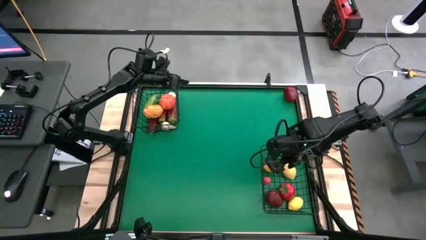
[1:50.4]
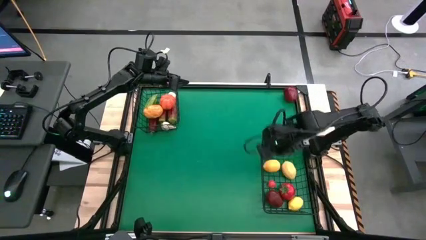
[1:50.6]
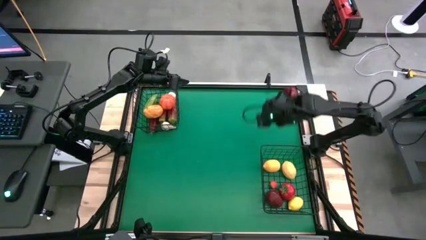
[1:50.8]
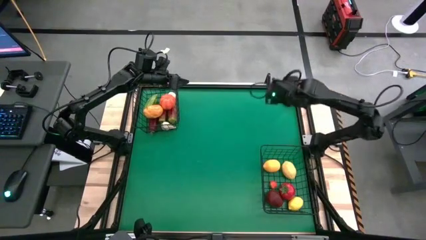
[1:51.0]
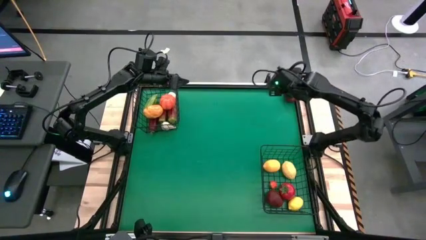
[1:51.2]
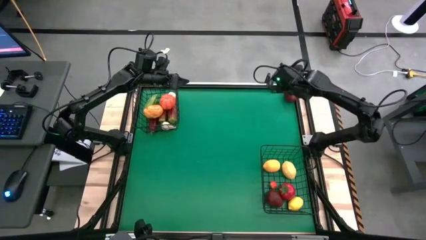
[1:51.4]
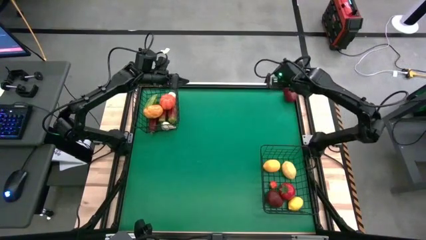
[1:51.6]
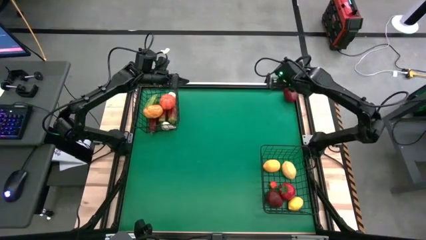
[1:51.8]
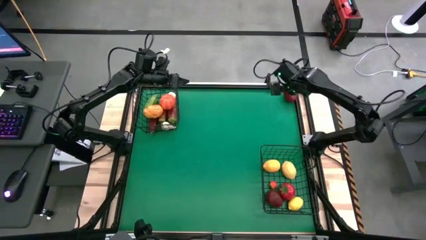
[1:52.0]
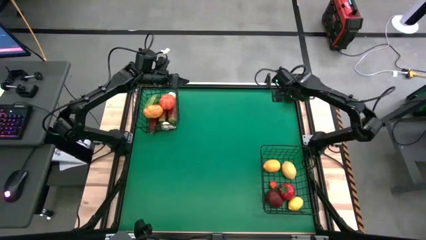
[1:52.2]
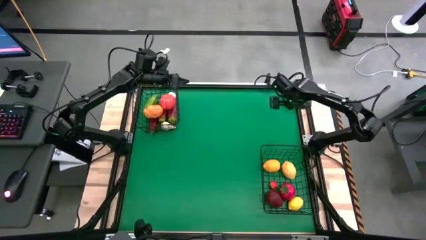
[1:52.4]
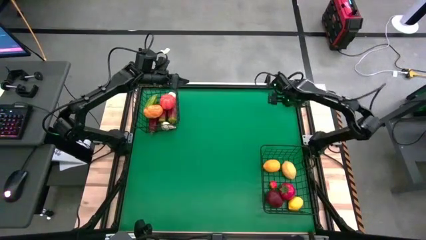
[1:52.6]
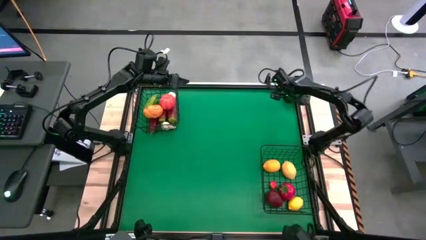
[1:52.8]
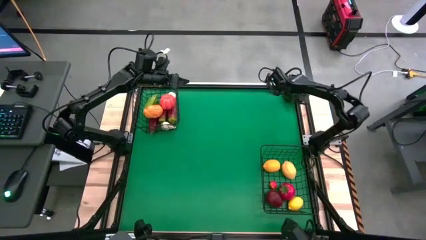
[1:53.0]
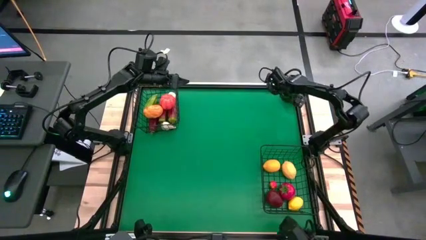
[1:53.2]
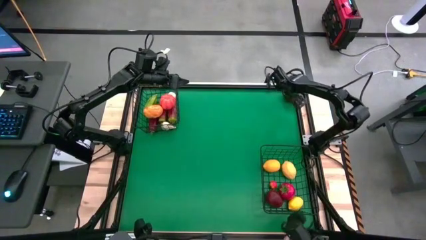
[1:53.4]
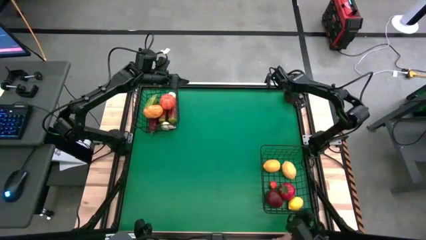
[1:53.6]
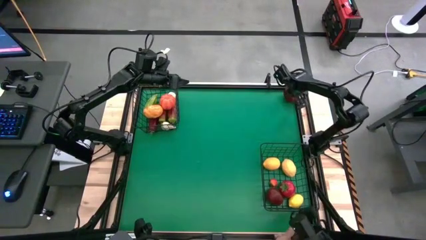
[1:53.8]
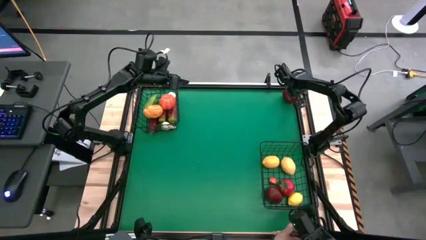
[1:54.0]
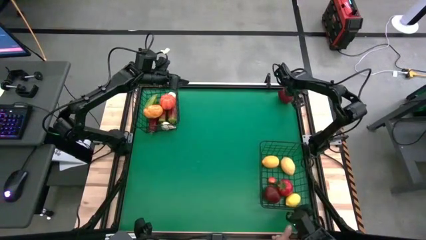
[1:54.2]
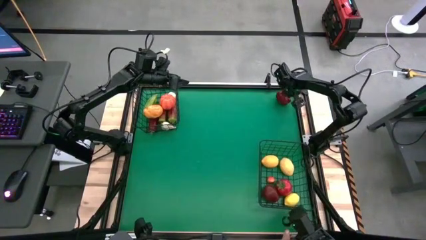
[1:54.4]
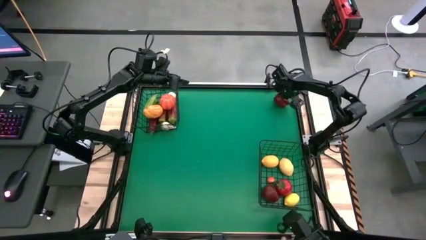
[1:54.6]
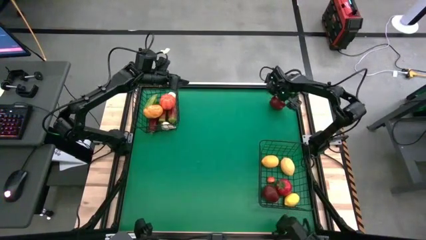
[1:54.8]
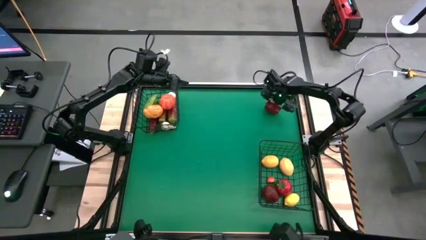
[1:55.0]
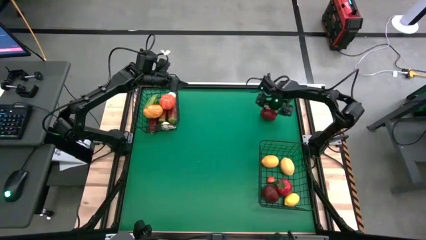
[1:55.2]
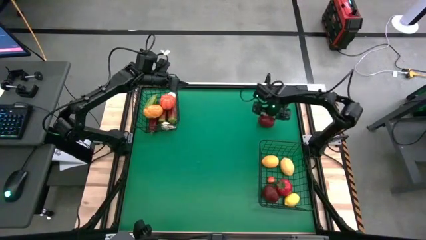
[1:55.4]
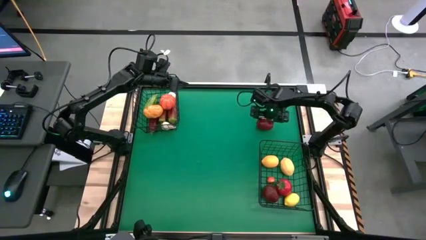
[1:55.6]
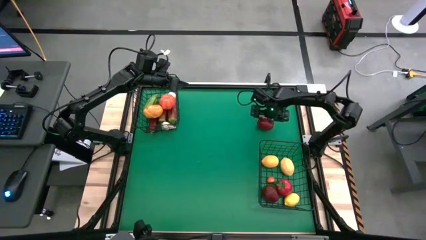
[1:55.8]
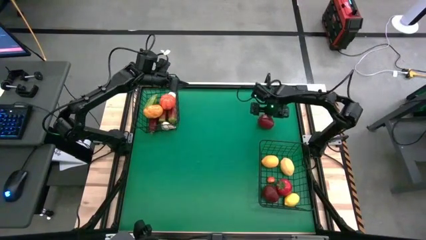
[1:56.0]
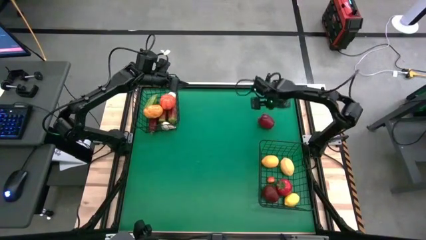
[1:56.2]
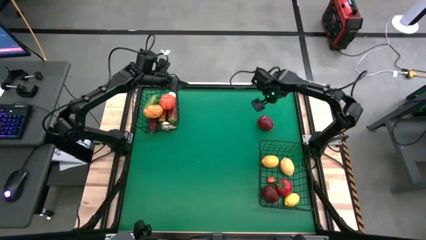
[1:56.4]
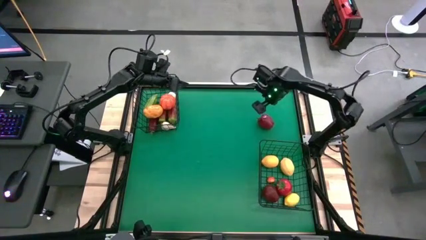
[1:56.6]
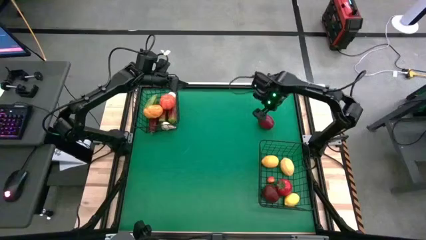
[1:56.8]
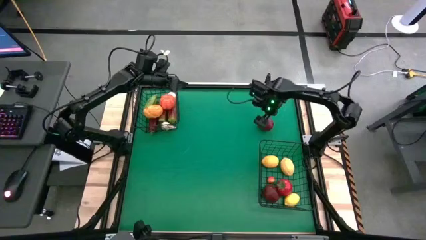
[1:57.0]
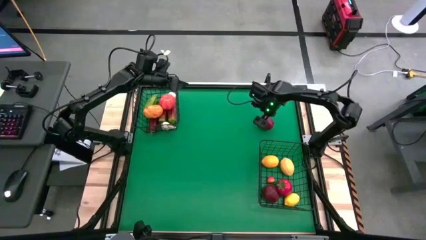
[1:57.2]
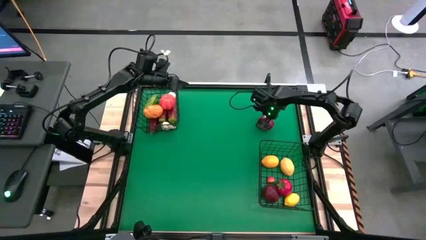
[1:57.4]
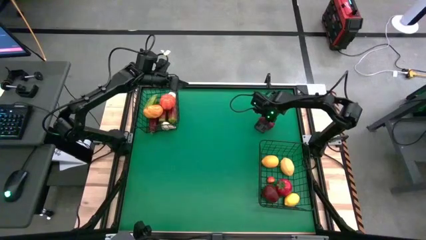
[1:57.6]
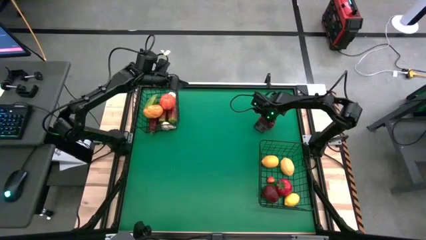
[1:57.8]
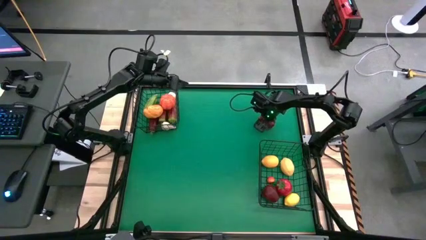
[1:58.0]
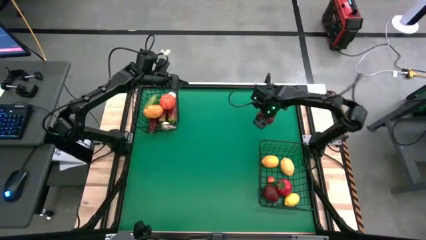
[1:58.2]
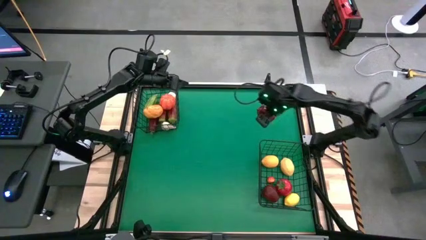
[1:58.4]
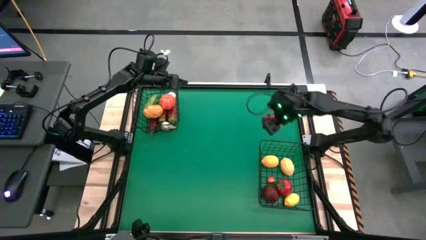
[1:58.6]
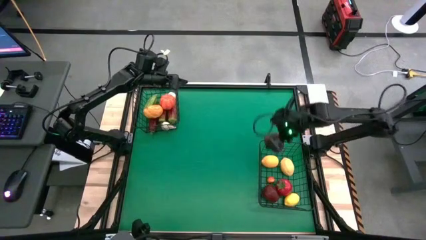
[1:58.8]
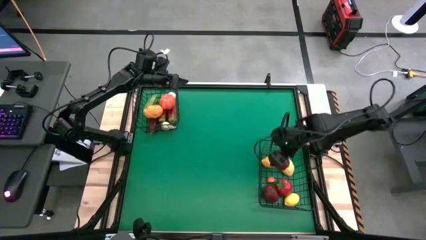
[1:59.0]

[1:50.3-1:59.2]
Task: Sort produce into baskets
Put the red apple into the bottom black wire basket

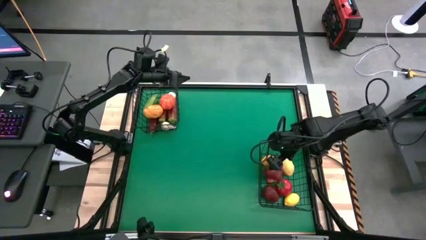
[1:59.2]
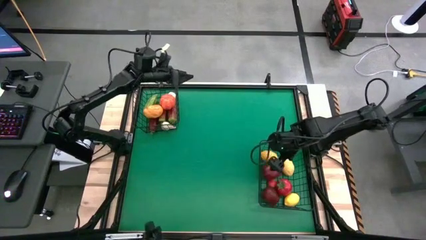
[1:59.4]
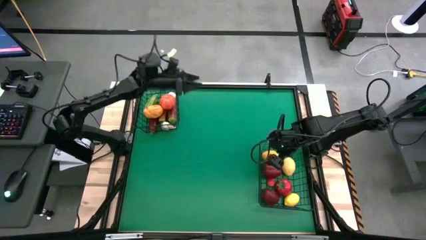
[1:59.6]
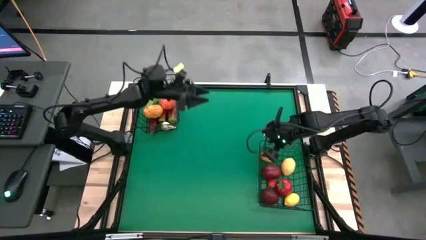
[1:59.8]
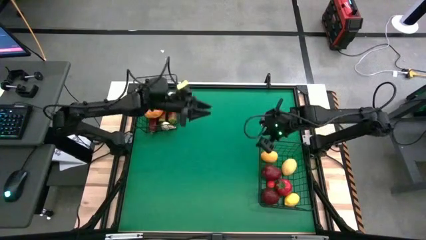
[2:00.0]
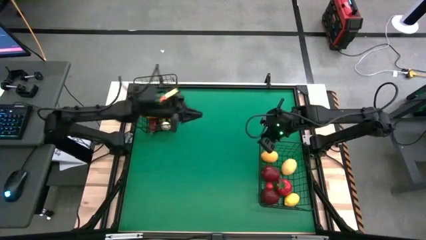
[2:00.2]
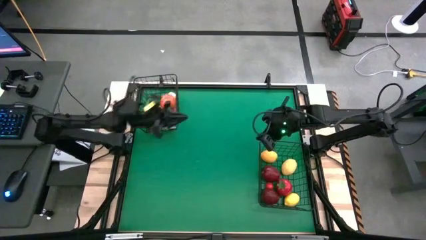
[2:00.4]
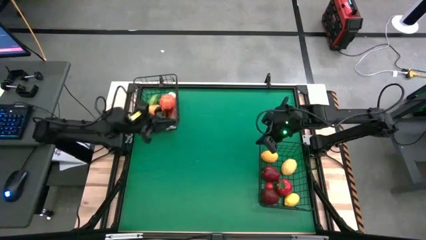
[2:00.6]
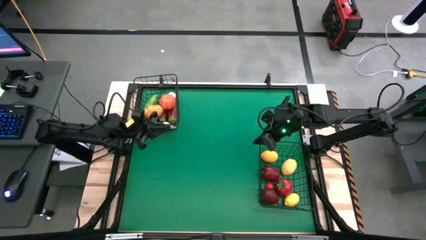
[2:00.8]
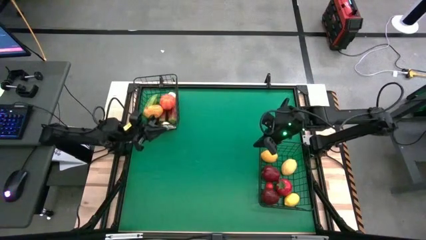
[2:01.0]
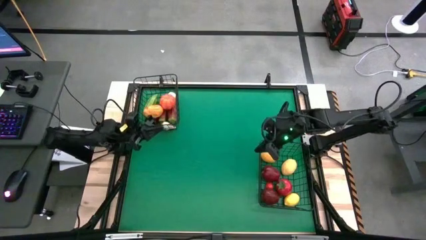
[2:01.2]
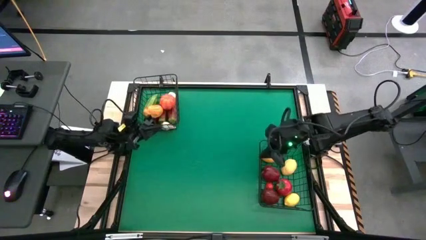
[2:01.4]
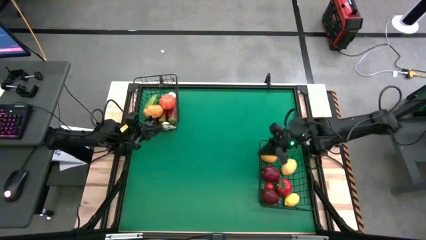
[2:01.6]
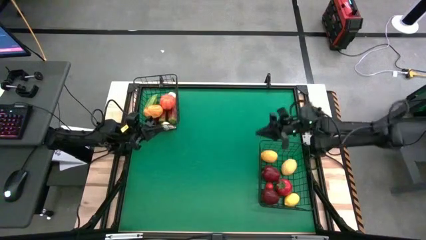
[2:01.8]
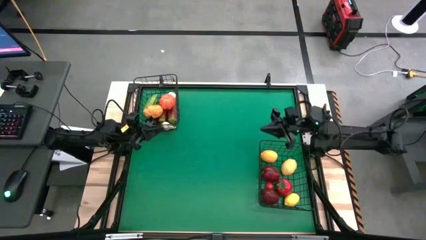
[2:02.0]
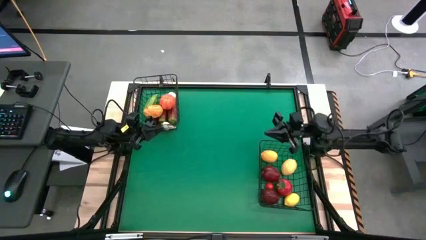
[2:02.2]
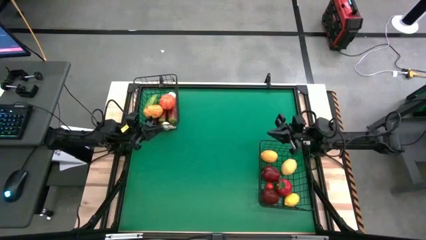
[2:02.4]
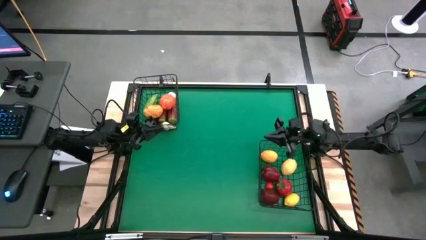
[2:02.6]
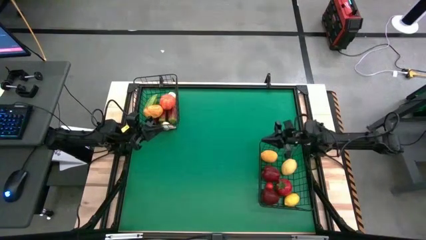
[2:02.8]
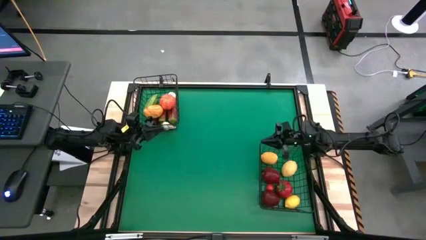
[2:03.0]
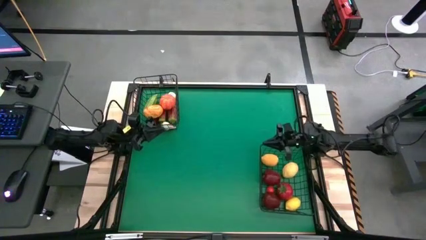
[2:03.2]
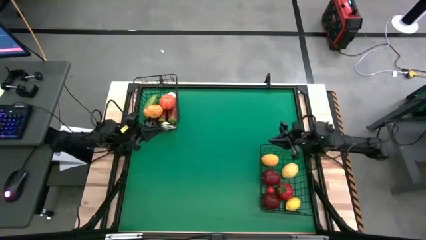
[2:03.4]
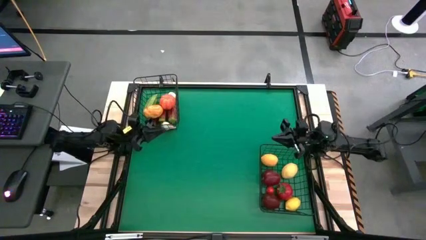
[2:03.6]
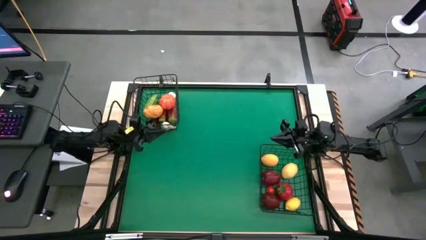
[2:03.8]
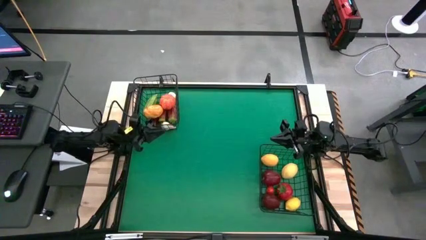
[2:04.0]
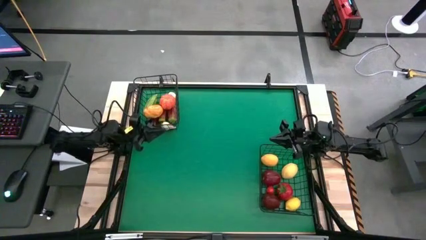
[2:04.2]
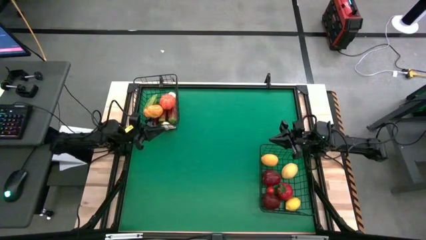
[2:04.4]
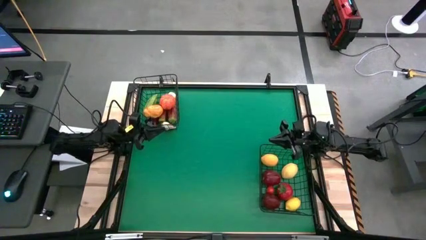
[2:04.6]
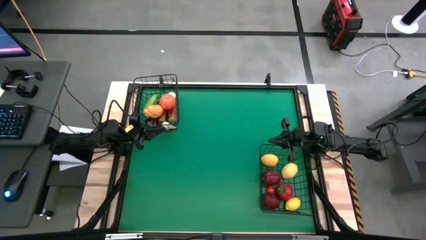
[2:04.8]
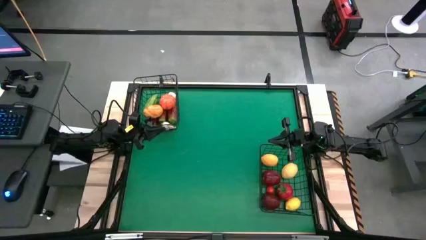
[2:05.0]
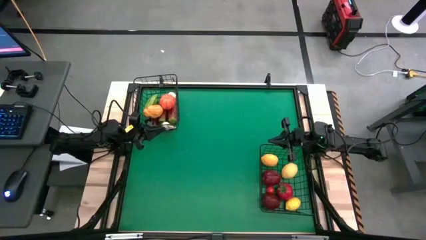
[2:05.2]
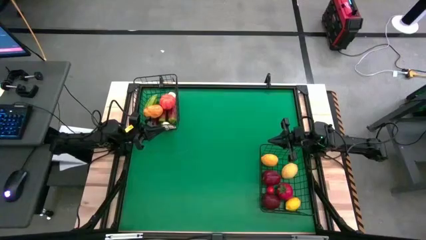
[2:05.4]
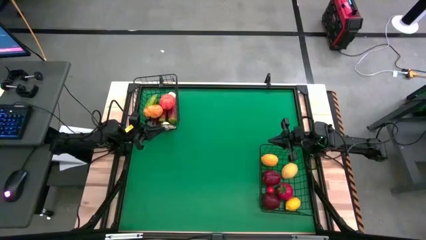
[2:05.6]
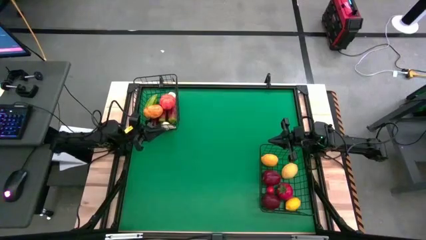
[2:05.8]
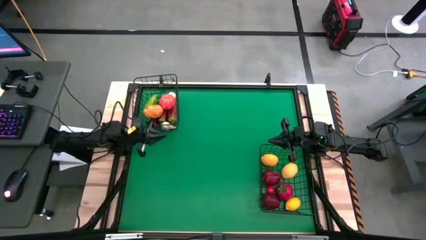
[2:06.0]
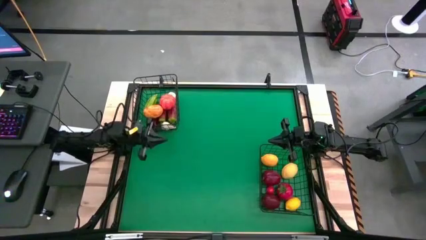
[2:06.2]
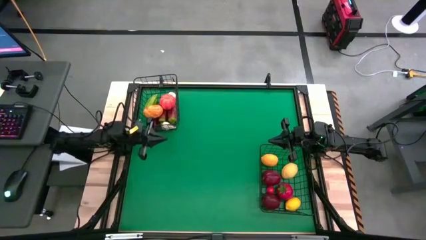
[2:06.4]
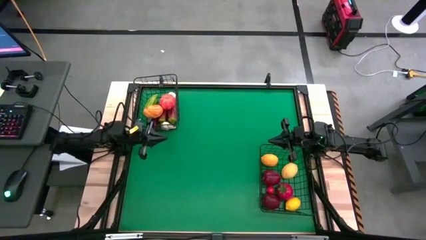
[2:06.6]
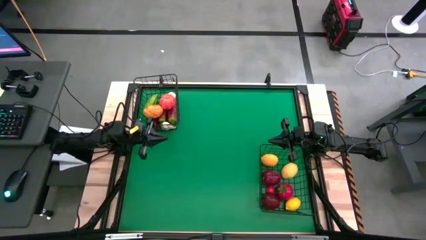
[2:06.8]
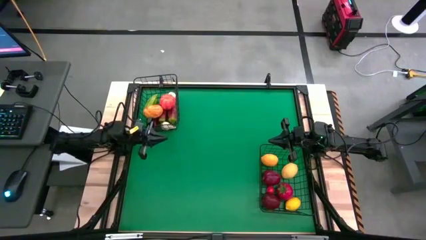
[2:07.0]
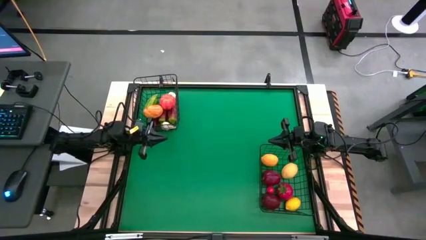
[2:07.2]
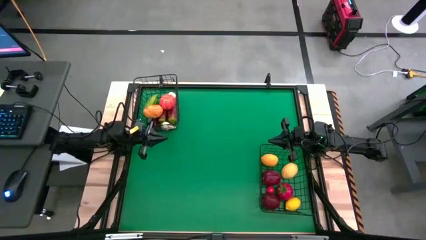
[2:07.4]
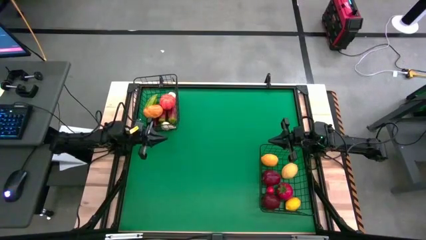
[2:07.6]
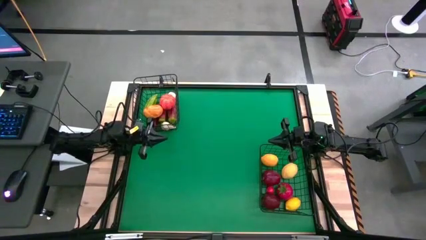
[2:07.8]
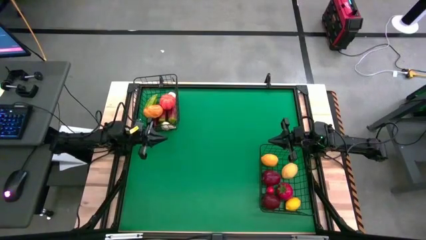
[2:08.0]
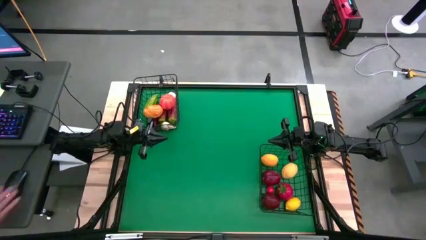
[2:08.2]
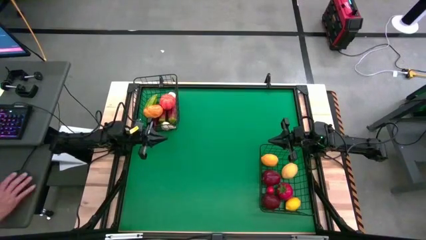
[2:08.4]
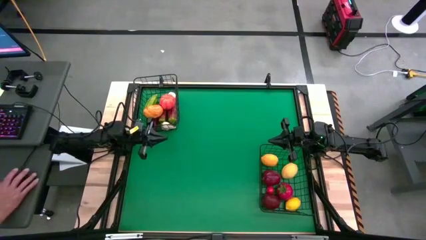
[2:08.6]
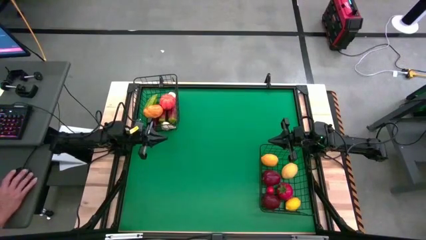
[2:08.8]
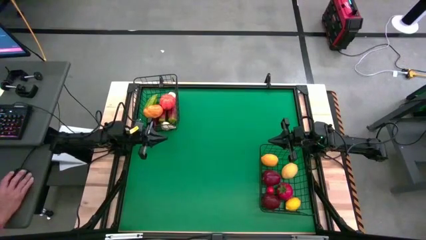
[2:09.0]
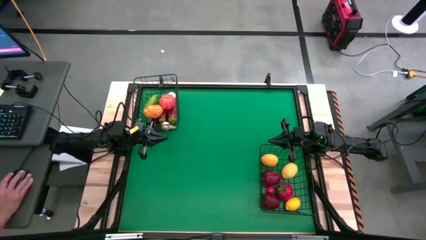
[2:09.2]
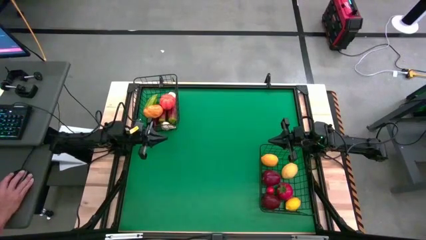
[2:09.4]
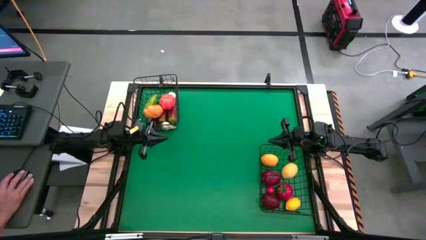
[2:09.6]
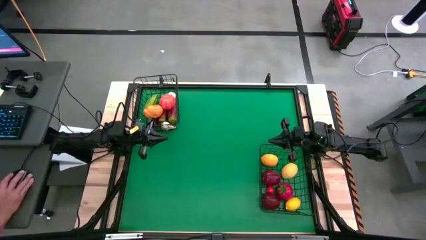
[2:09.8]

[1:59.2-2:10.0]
Return to Home Position
